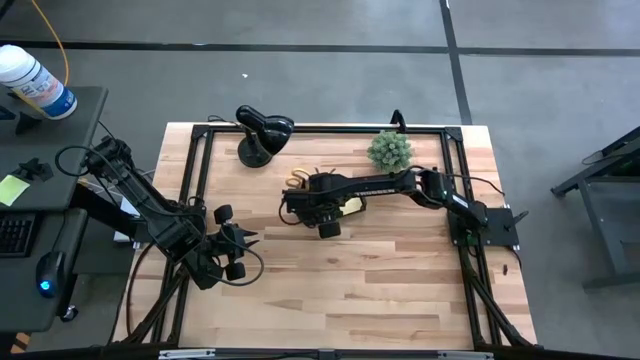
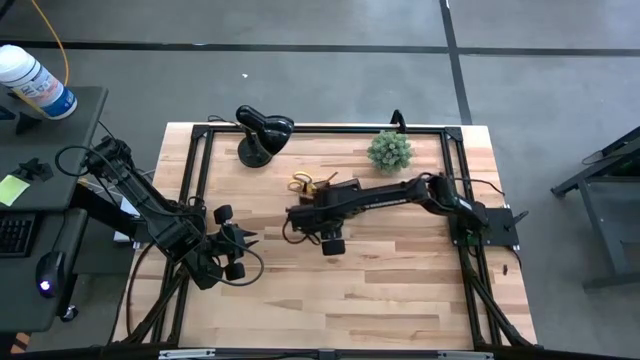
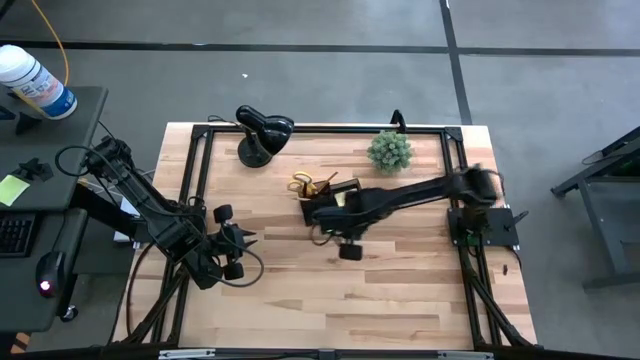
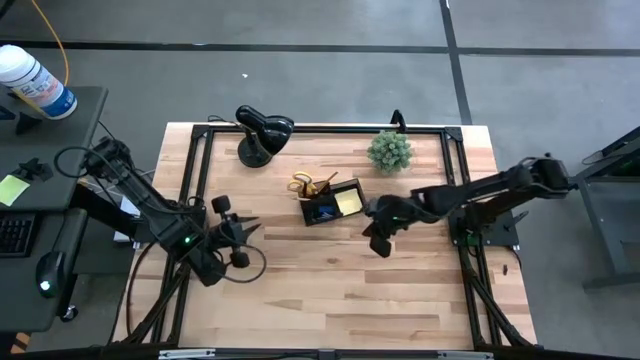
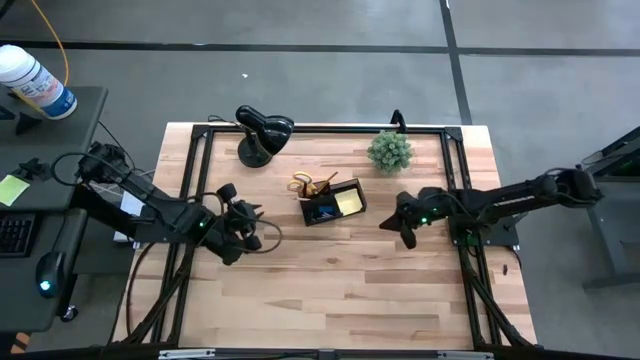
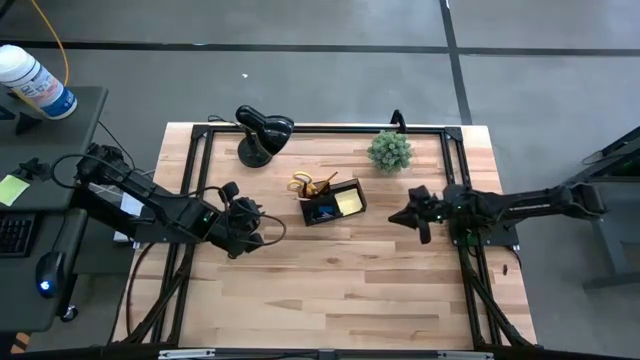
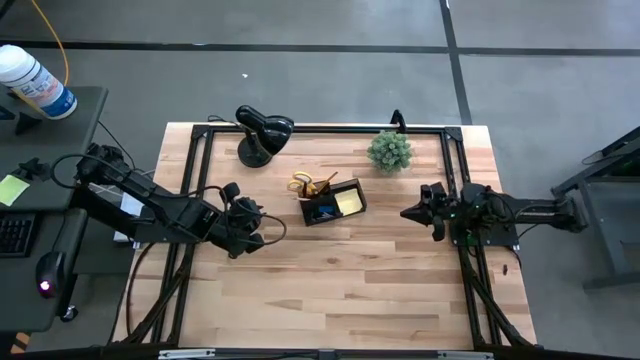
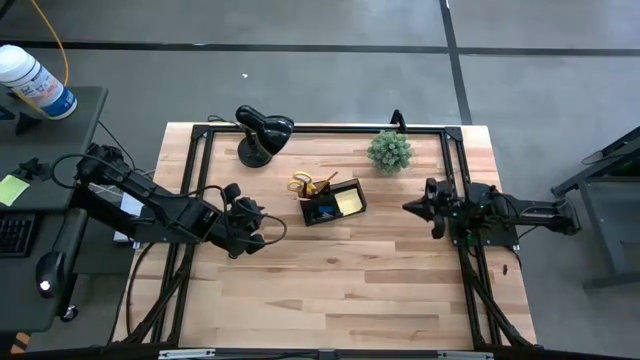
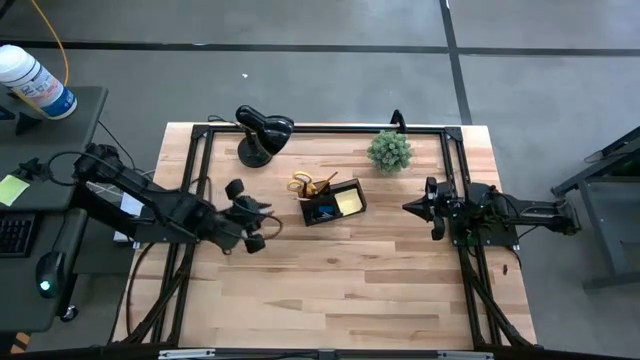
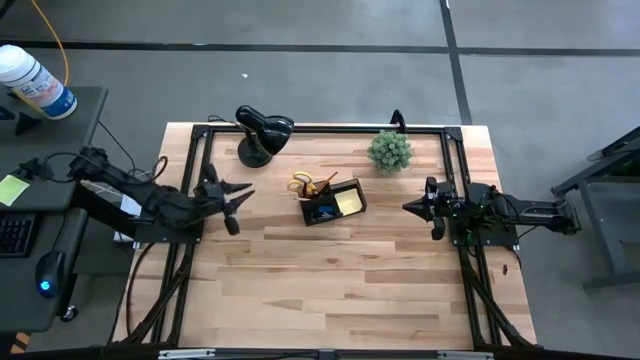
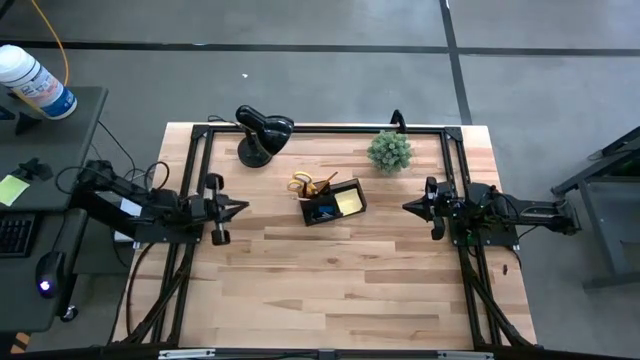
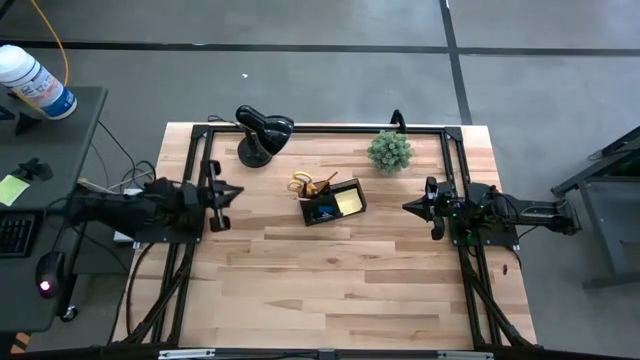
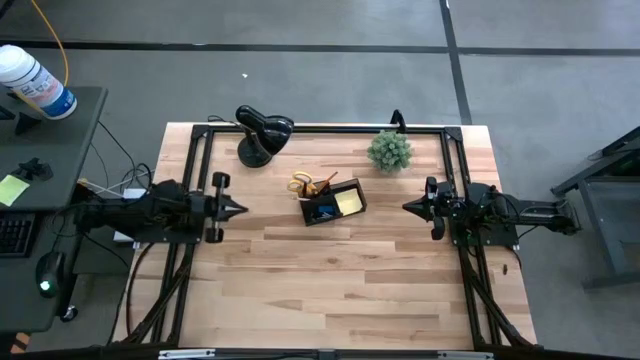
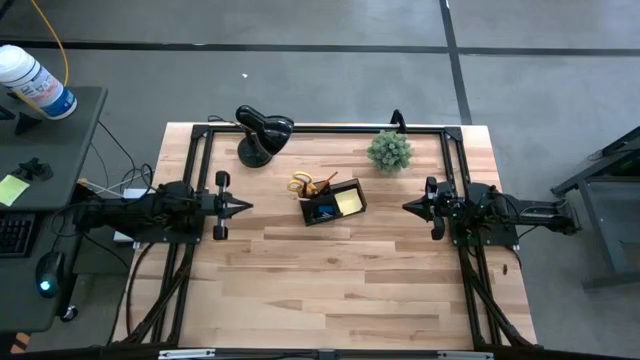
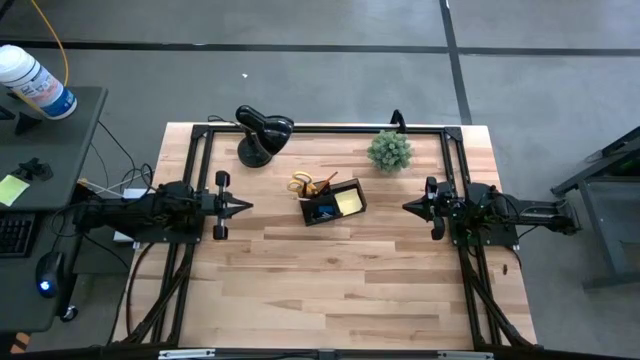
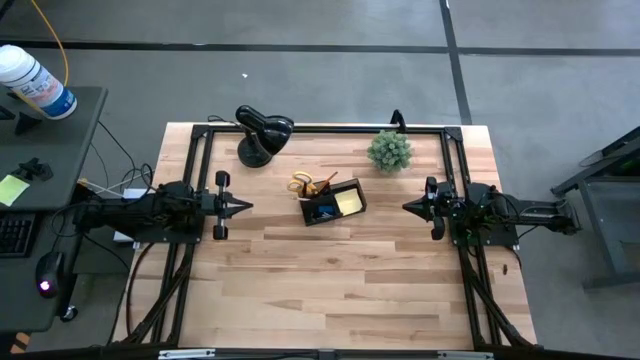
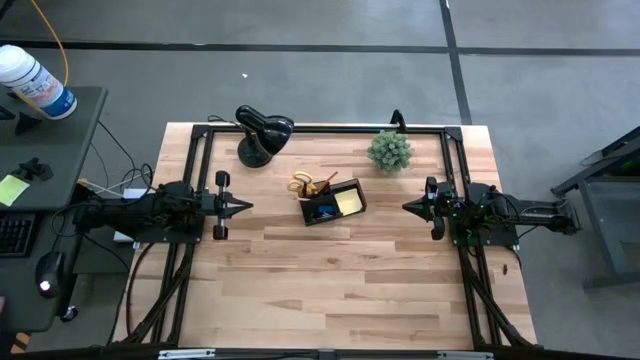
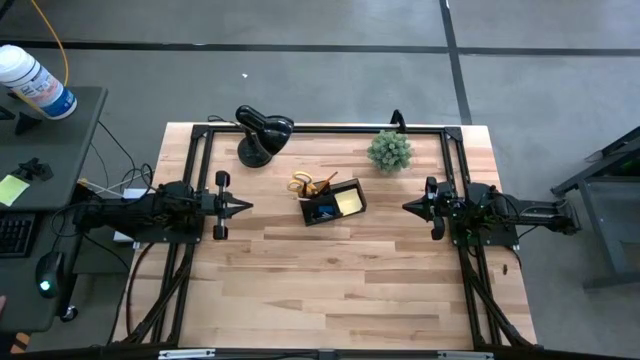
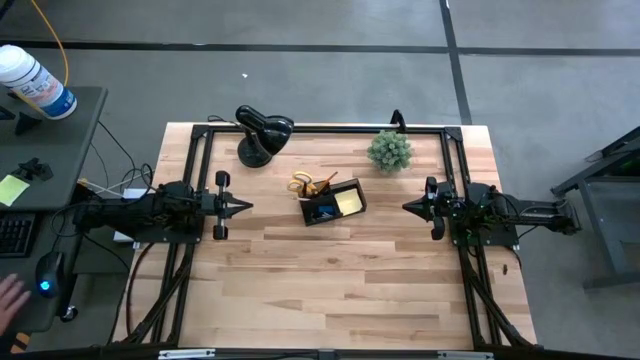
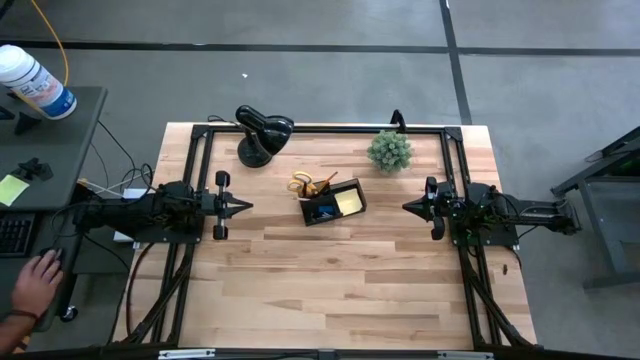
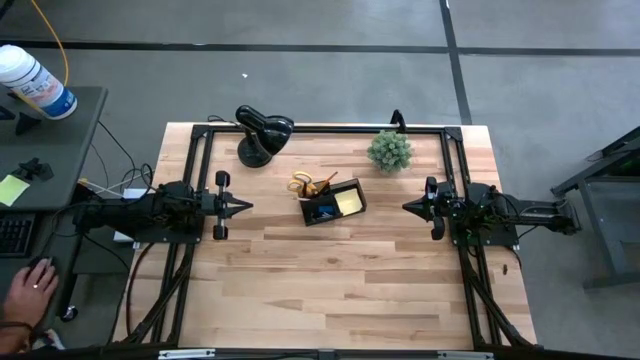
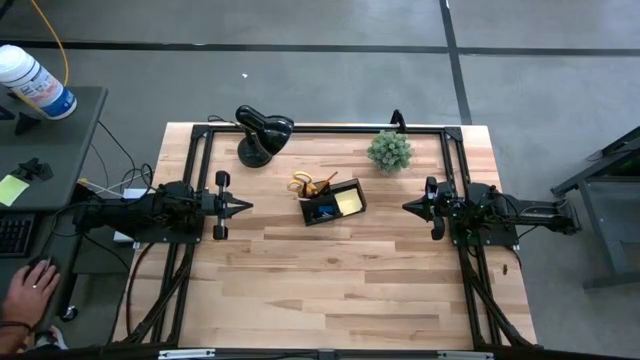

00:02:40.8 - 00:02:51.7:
Task: Pick and place office supplies into organizer
Return to Home Position

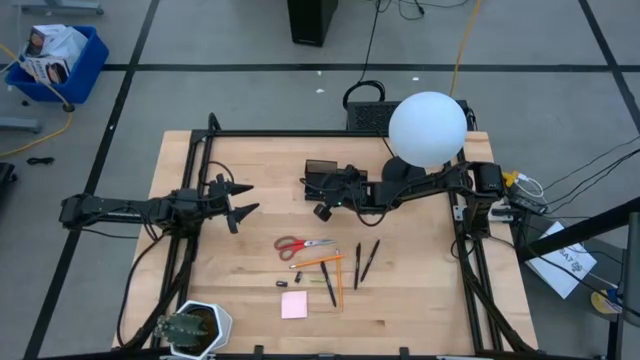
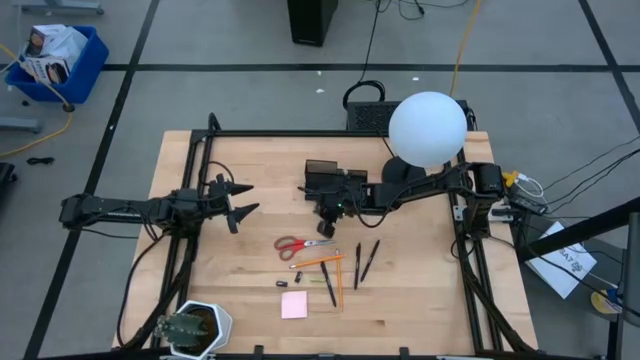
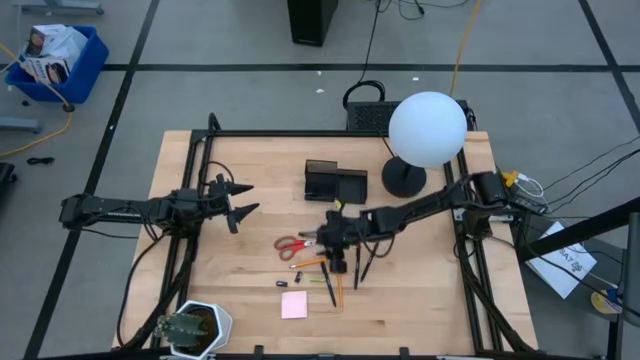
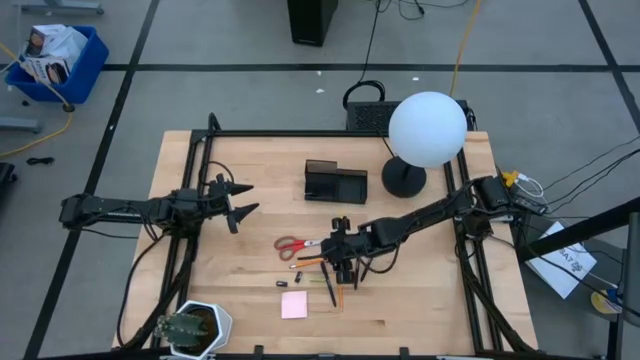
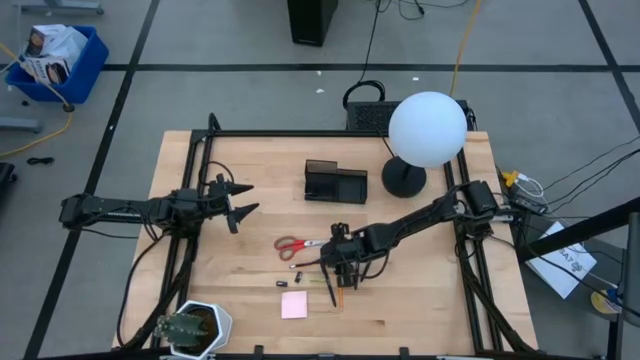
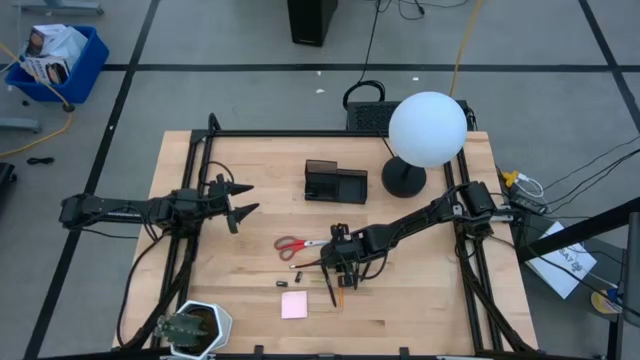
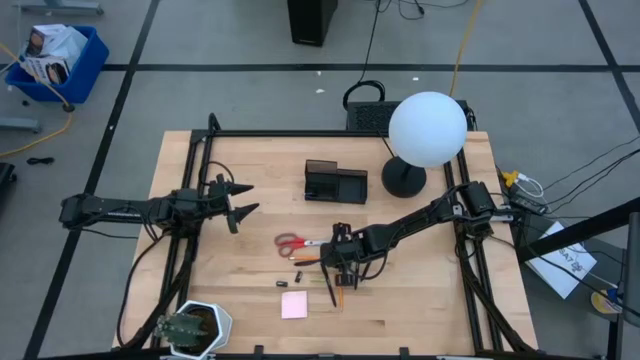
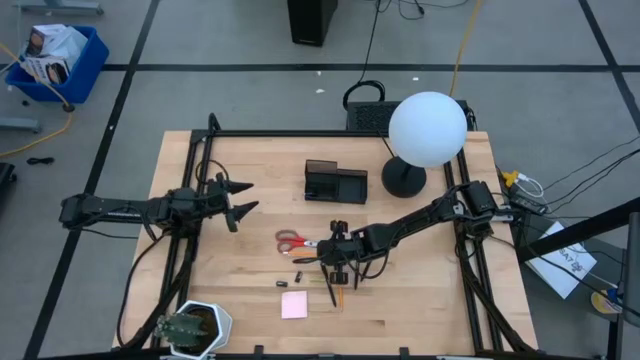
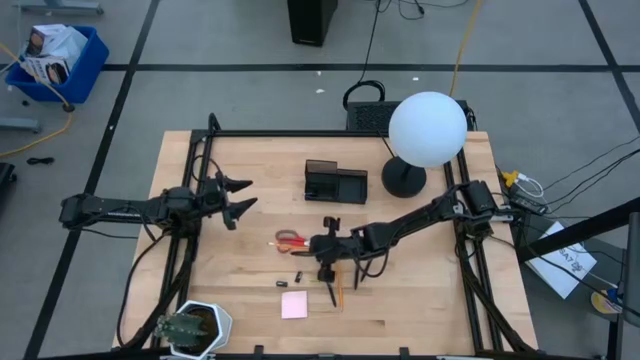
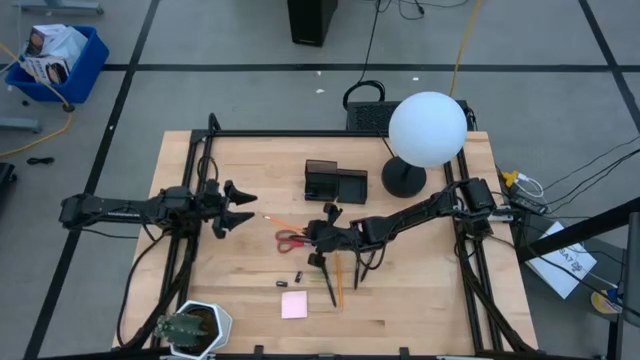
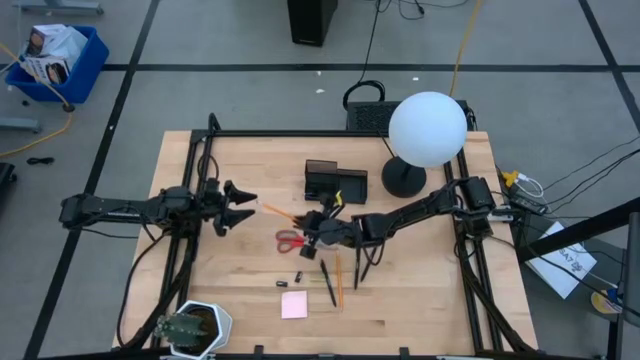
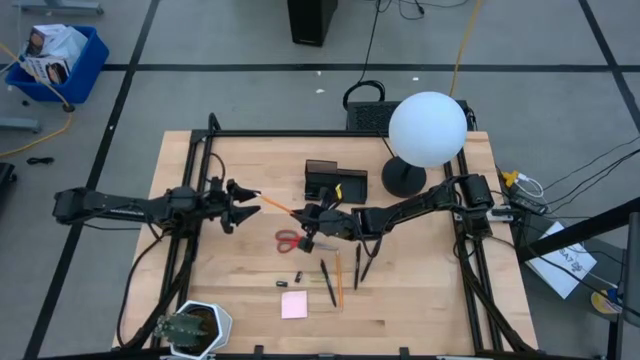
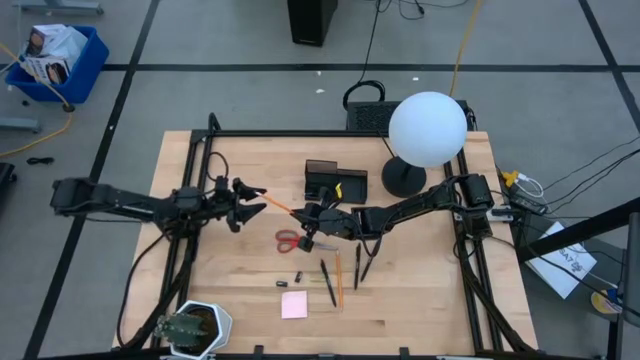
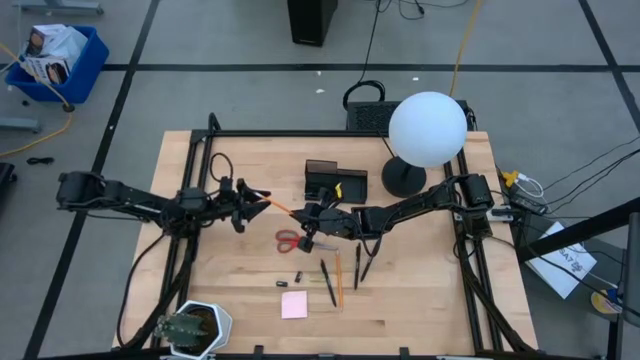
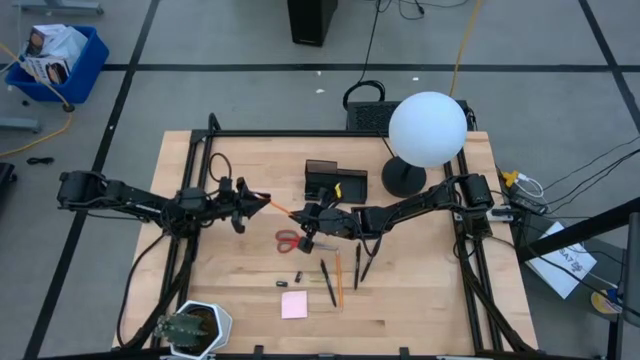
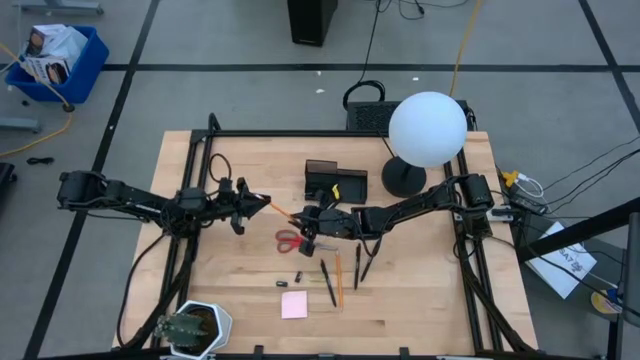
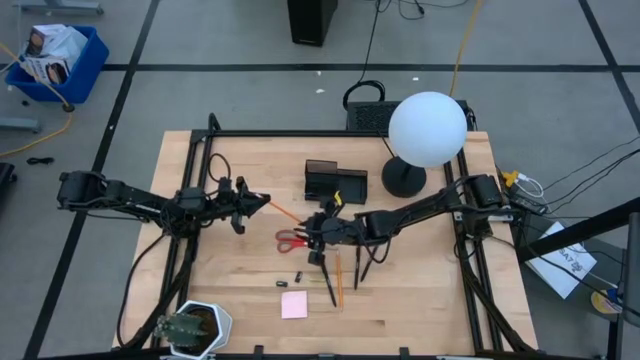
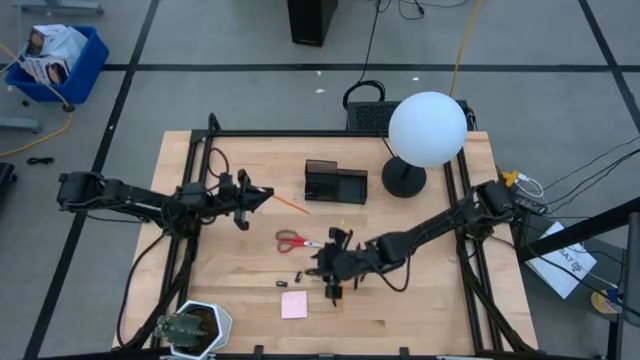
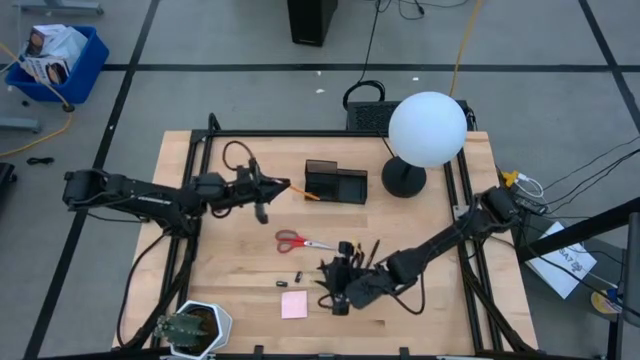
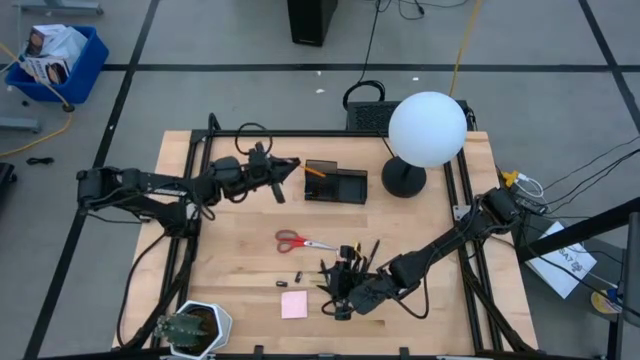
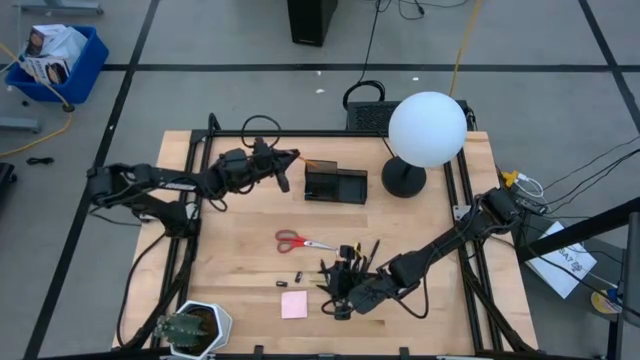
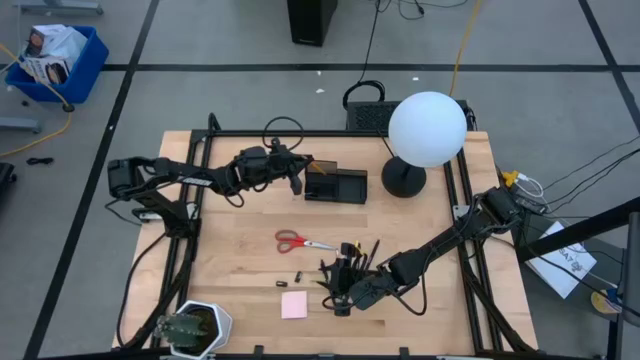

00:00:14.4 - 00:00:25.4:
Task: Pick and place office supplies into organizer
Put the top yellow pencil into the black desk organizer
